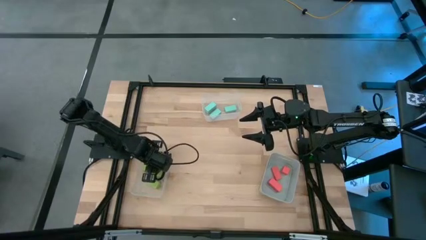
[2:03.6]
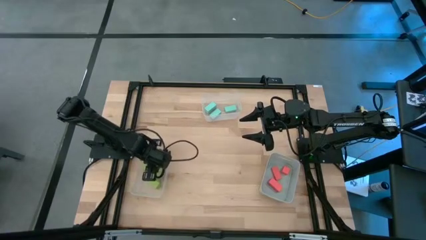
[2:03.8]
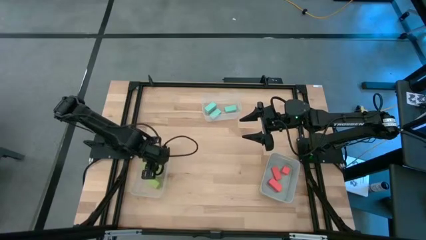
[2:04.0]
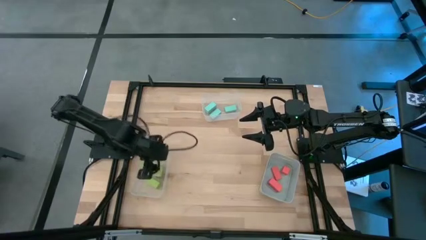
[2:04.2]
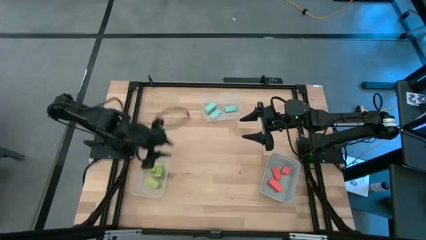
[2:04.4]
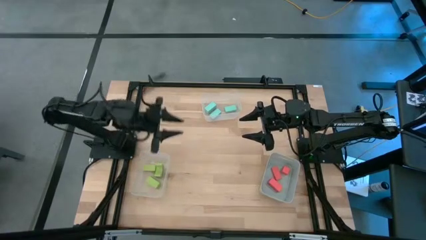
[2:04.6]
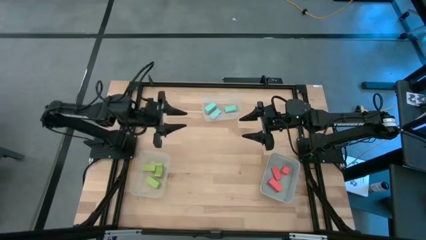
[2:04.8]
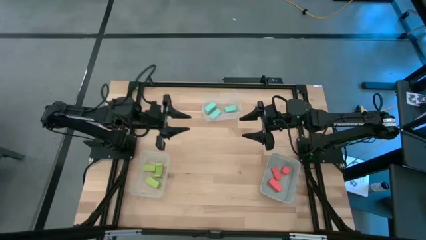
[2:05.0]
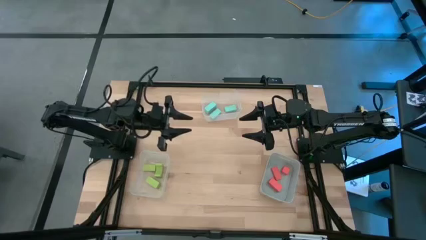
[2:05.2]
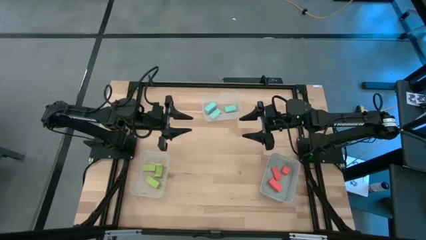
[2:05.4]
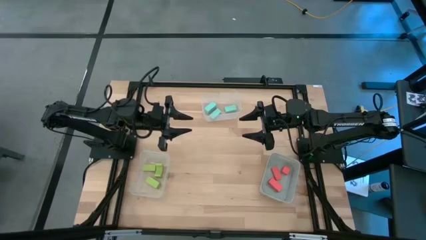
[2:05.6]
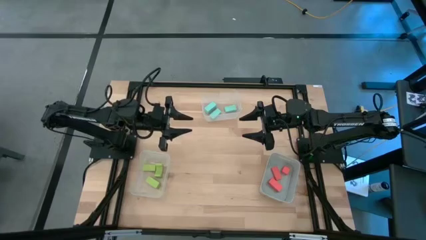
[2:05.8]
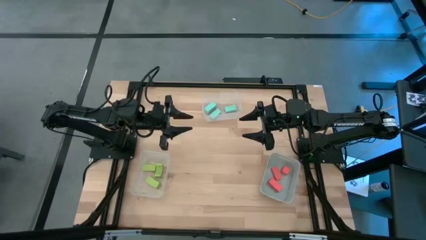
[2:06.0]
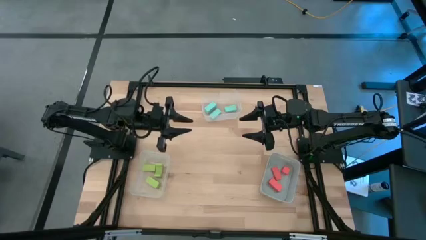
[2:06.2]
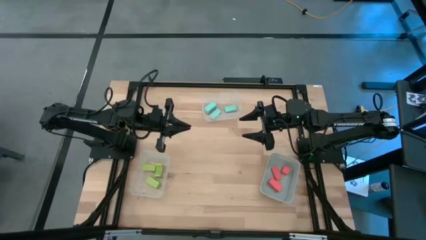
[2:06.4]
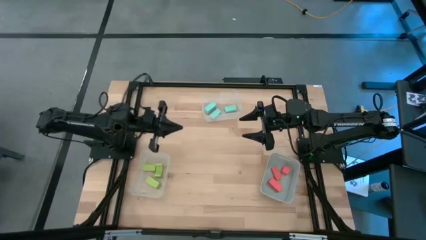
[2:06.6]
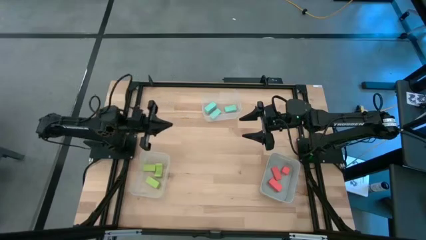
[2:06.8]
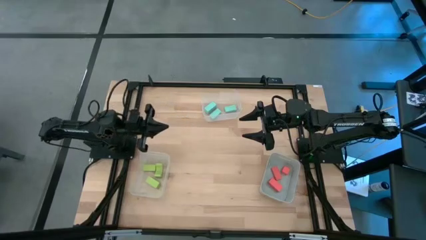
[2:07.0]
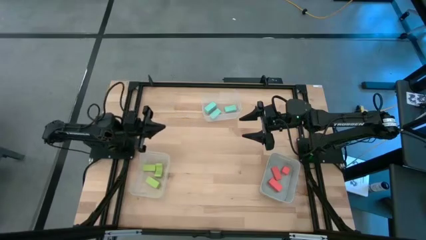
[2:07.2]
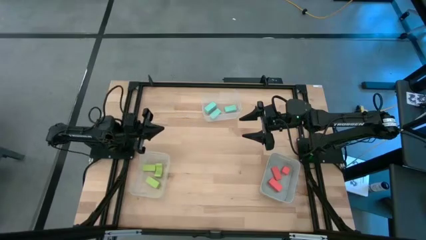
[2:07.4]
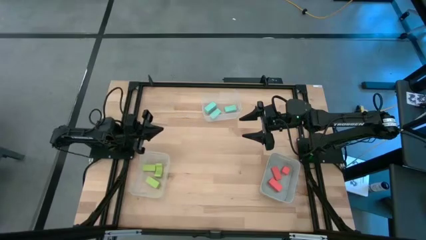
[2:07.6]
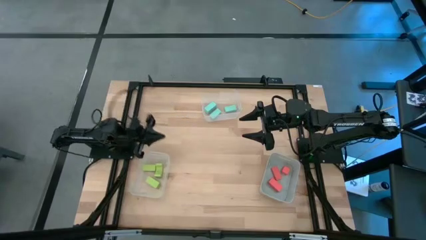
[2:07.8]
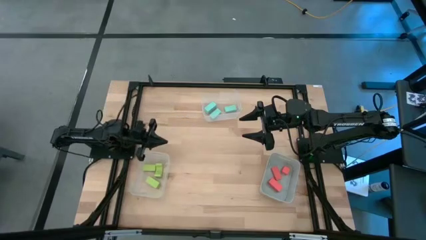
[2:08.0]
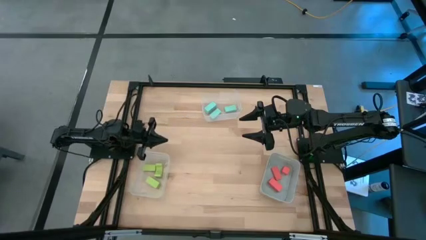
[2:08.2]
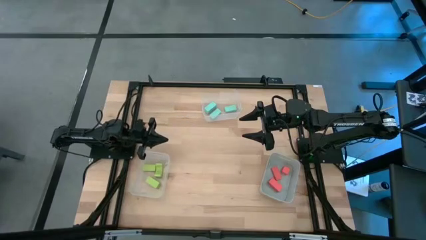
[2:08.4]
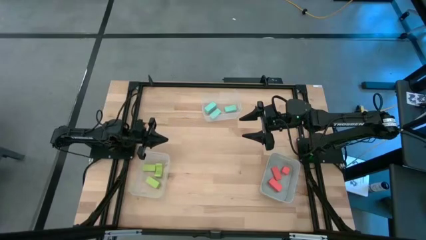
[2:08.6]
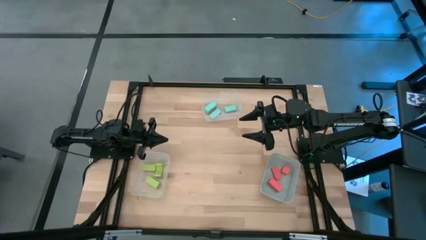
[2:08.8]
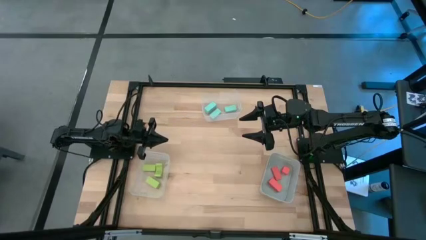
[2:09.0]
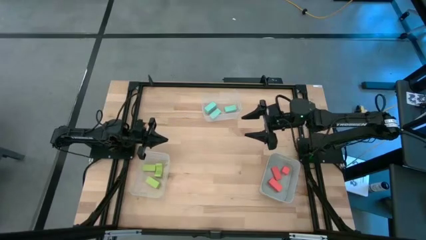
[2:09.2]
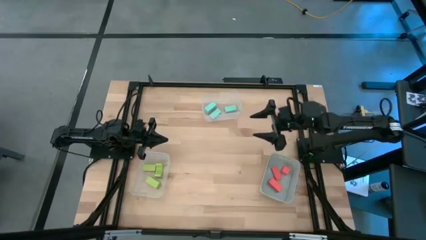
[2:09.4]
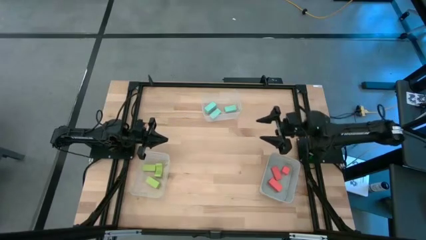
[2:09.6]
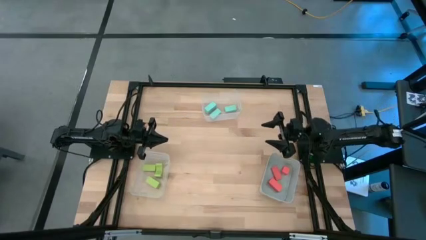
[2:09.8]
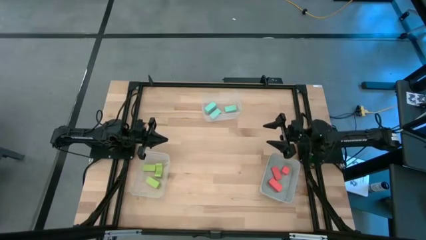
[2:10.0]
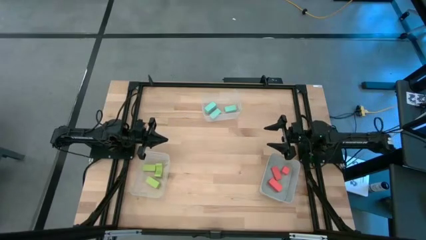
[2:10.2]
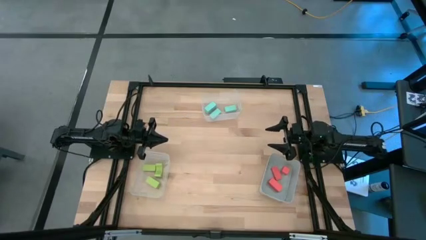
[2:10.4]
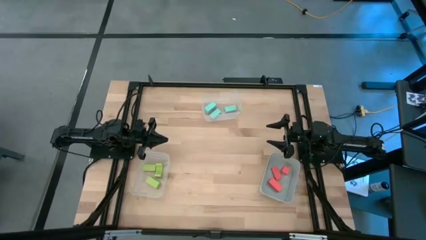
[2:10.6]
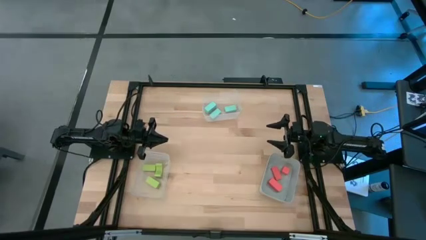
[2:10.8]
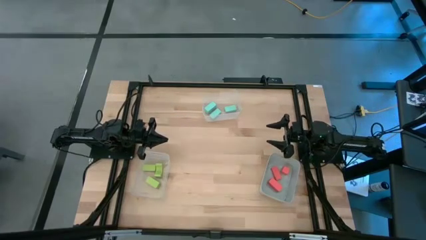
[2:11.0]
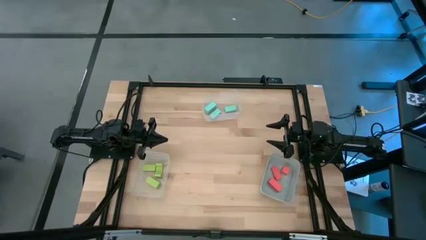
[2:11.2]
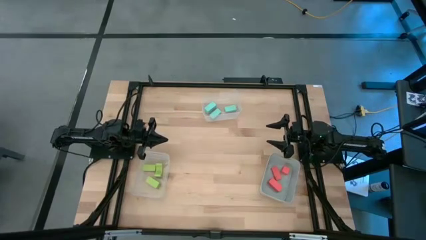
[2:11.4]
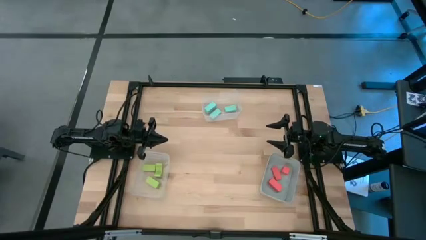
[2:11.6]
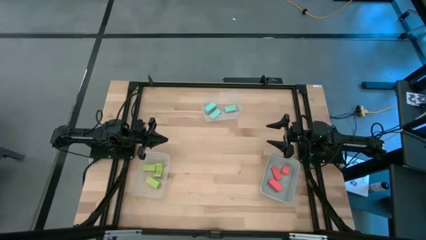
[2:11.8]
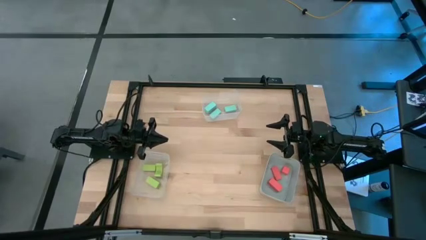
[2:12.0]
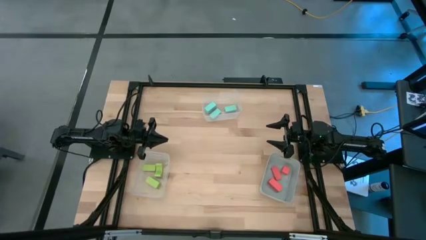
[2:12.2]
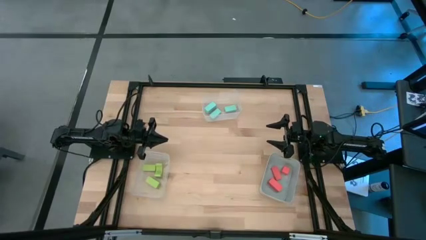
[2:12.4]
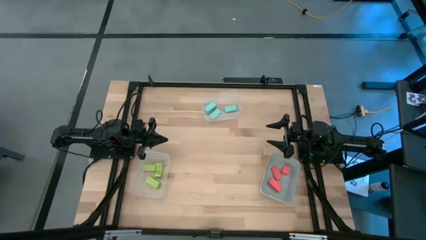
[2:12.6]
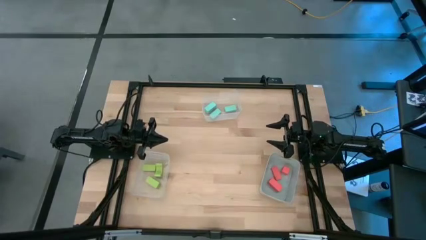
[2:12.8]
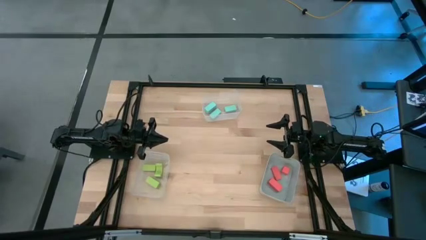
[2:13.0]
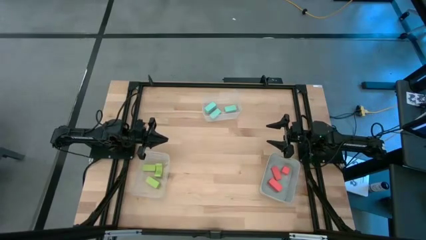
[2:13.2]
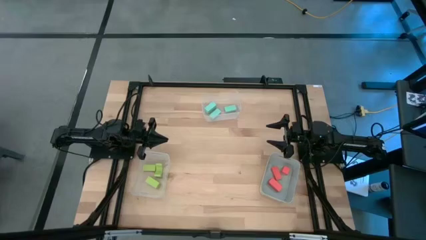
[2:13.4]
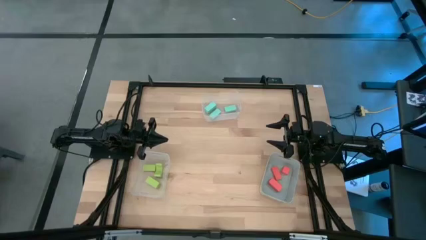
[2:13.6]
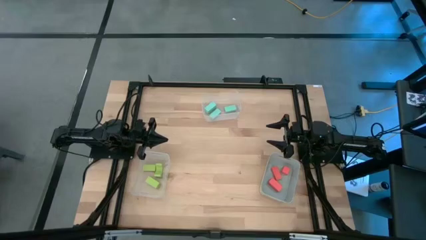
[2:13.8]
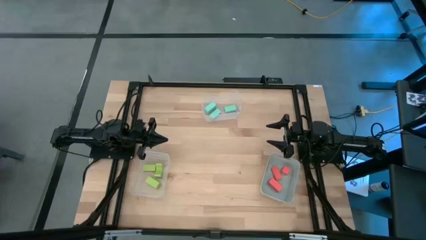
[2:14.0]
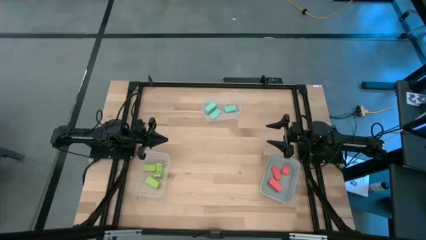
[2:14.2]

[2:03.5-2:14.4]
Task: Sort & place blocks by color
Return to Home Position
